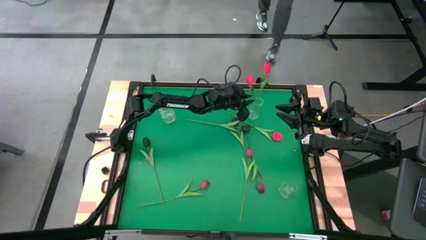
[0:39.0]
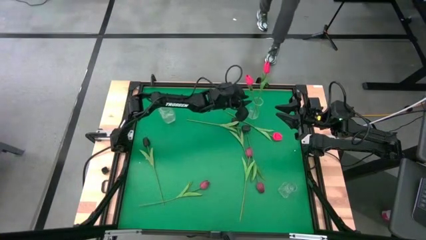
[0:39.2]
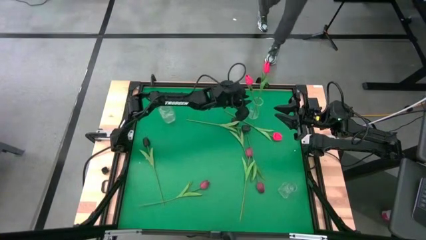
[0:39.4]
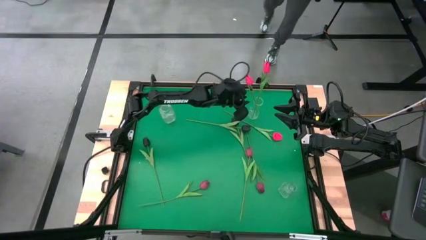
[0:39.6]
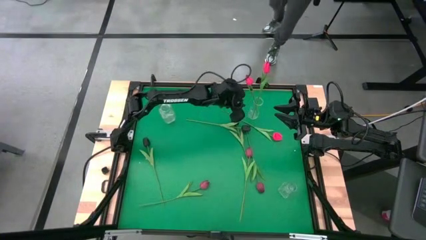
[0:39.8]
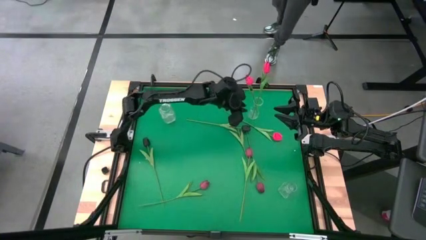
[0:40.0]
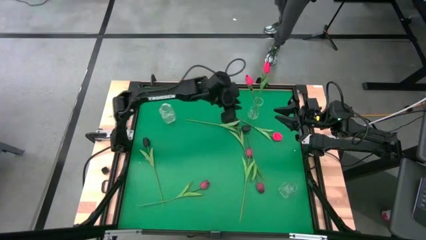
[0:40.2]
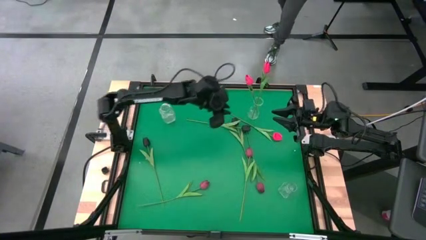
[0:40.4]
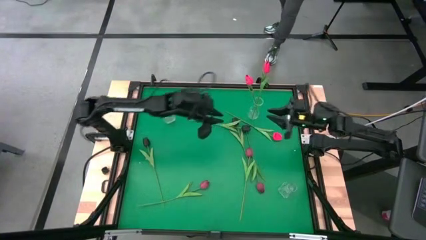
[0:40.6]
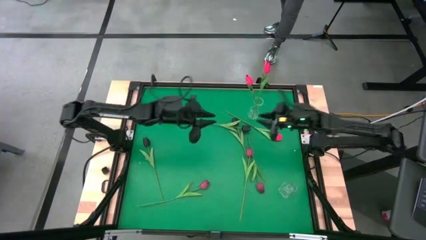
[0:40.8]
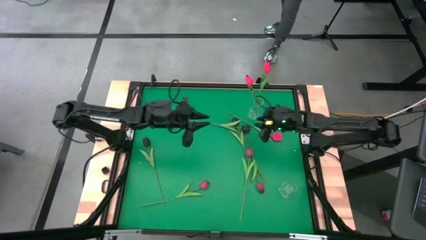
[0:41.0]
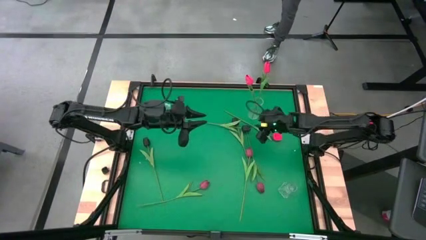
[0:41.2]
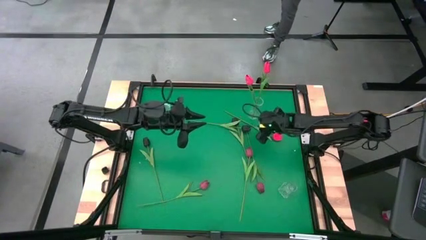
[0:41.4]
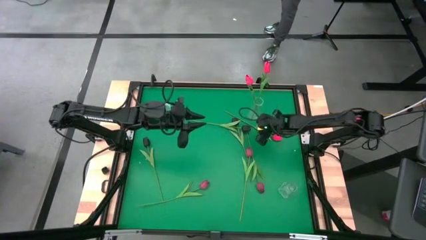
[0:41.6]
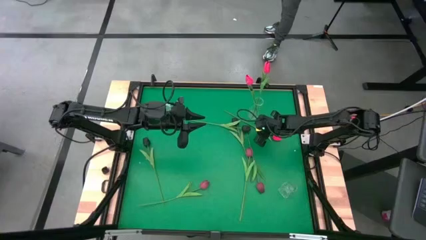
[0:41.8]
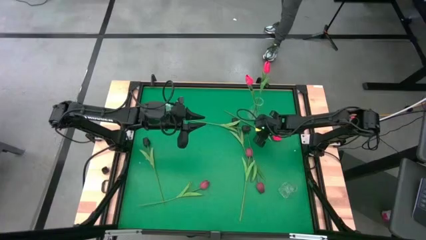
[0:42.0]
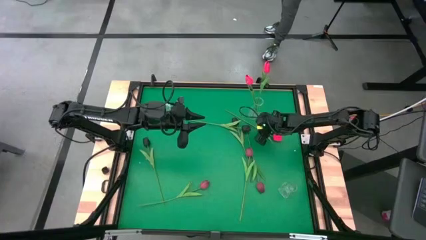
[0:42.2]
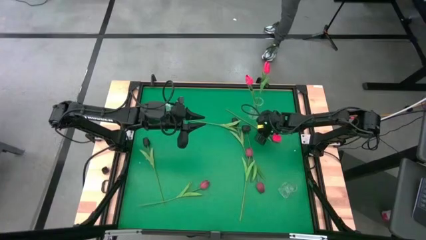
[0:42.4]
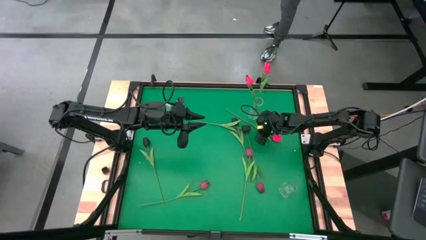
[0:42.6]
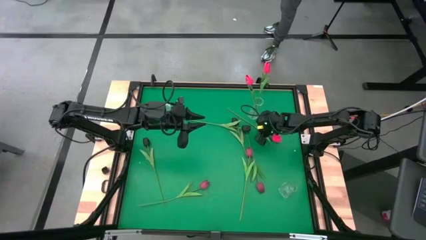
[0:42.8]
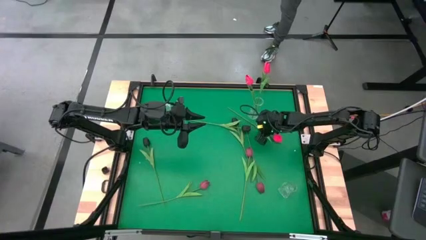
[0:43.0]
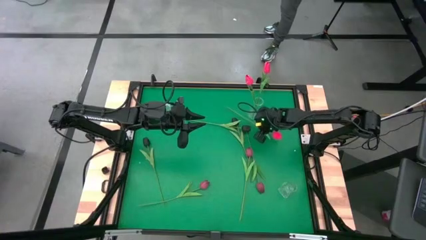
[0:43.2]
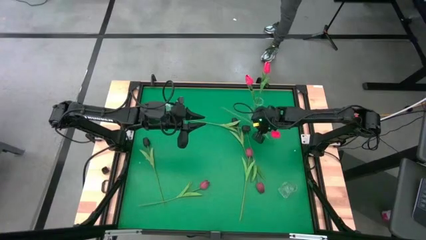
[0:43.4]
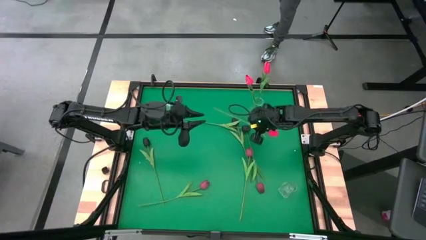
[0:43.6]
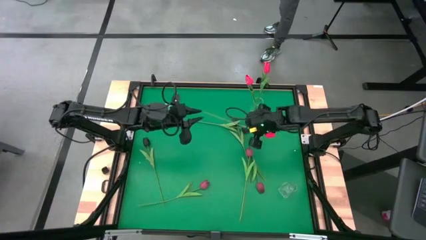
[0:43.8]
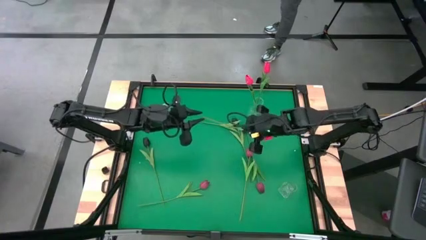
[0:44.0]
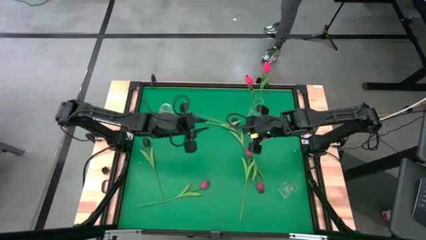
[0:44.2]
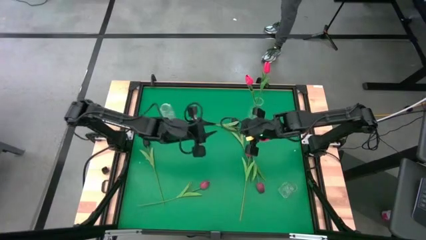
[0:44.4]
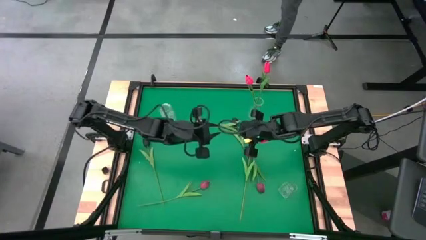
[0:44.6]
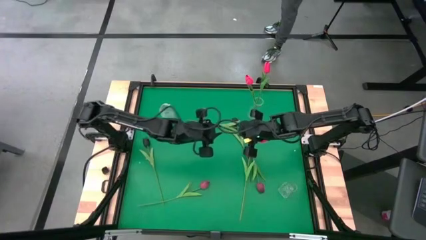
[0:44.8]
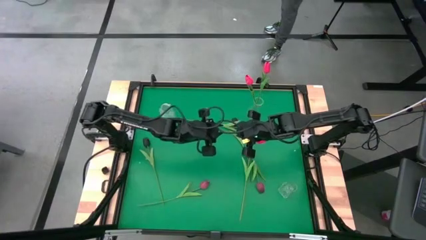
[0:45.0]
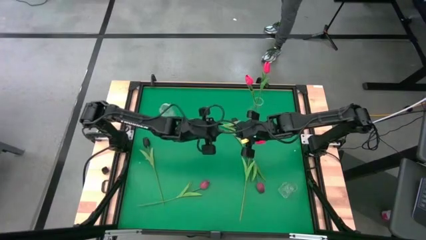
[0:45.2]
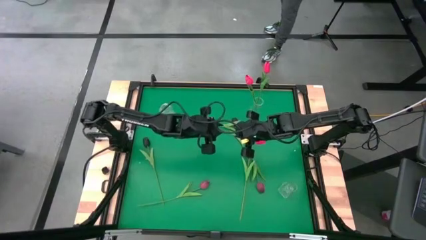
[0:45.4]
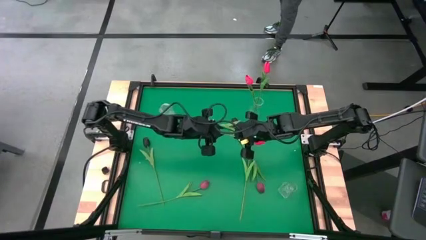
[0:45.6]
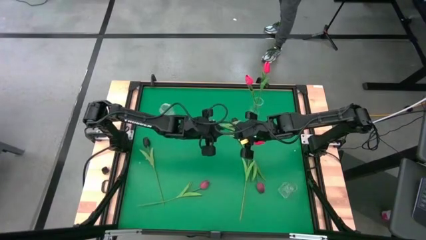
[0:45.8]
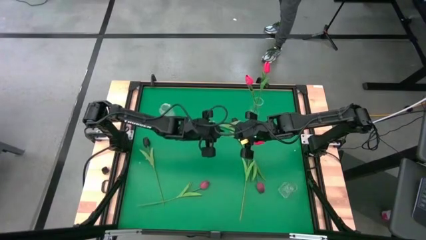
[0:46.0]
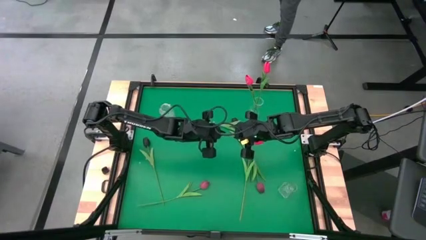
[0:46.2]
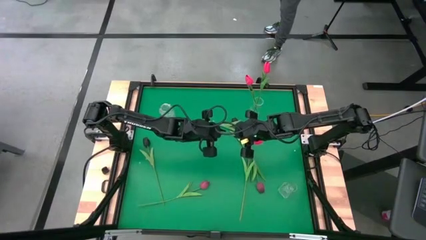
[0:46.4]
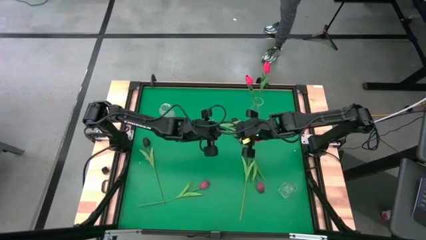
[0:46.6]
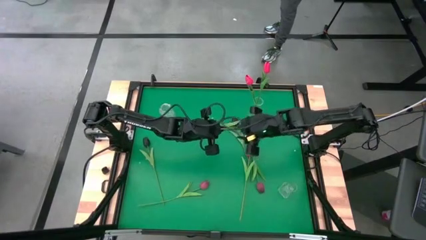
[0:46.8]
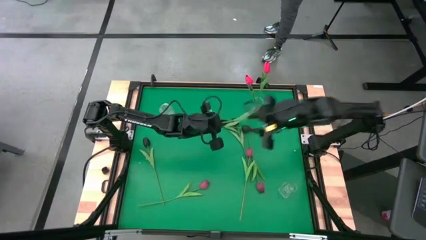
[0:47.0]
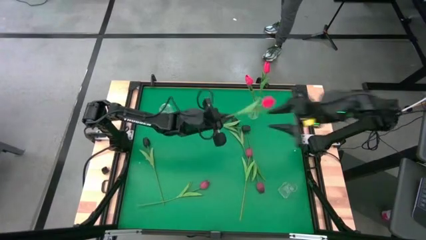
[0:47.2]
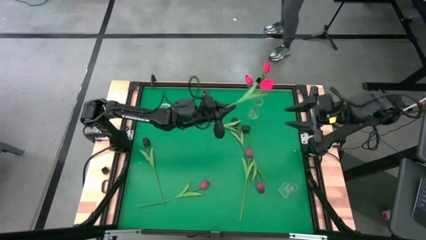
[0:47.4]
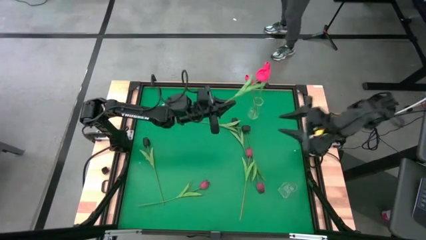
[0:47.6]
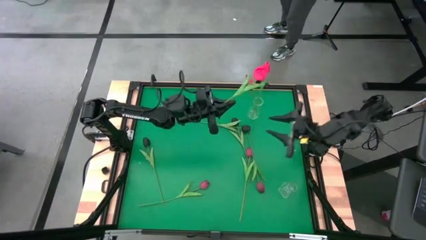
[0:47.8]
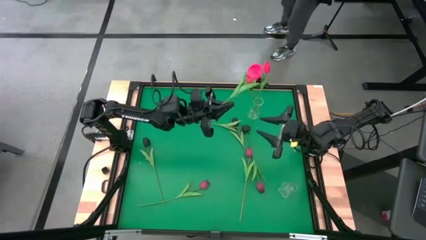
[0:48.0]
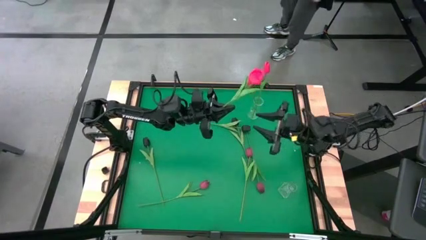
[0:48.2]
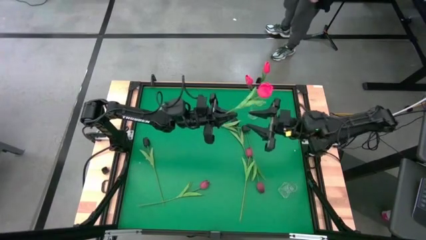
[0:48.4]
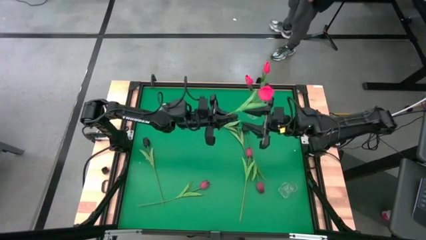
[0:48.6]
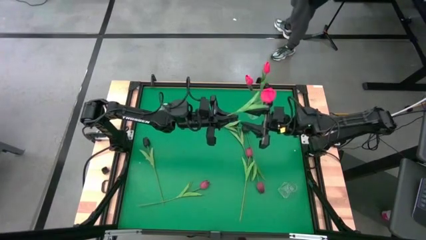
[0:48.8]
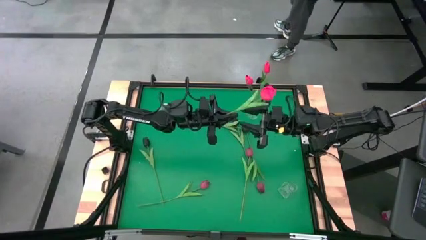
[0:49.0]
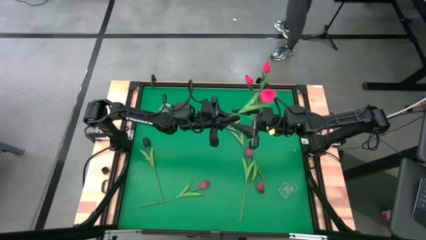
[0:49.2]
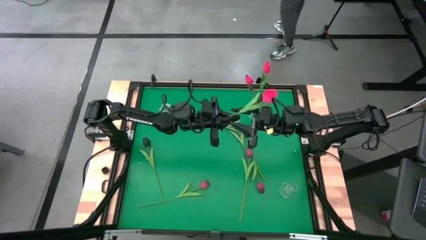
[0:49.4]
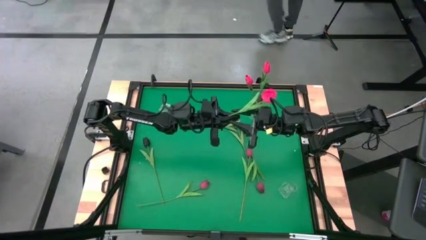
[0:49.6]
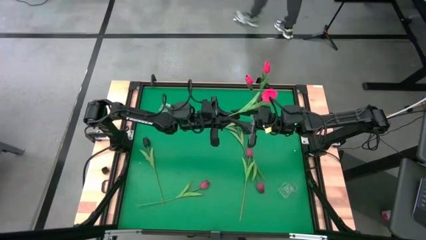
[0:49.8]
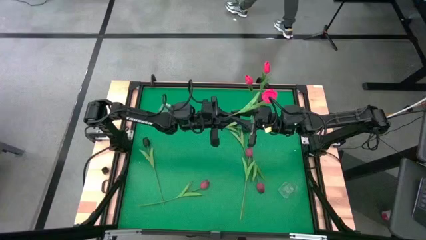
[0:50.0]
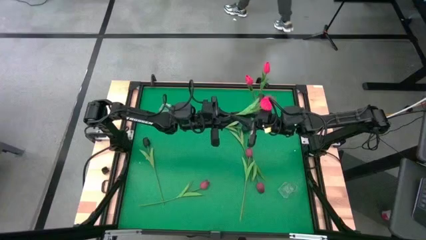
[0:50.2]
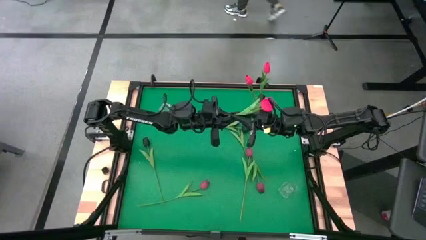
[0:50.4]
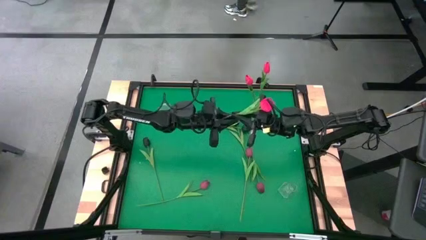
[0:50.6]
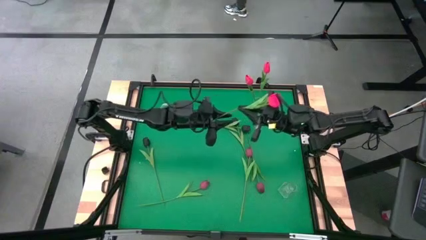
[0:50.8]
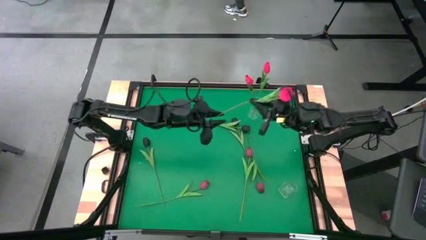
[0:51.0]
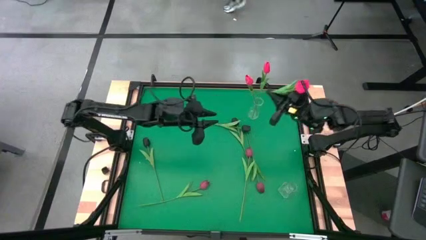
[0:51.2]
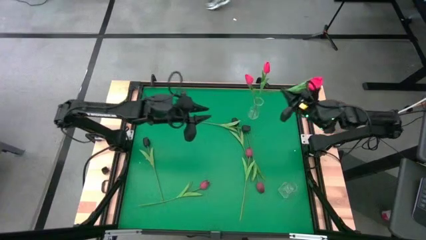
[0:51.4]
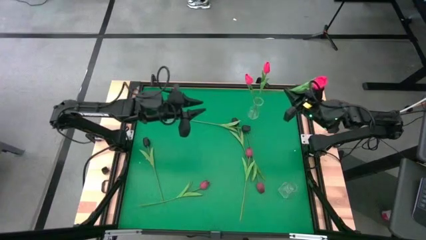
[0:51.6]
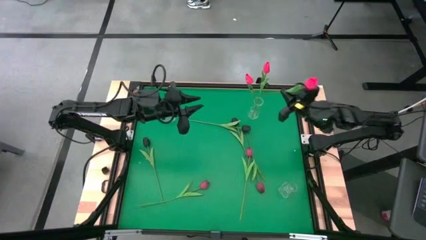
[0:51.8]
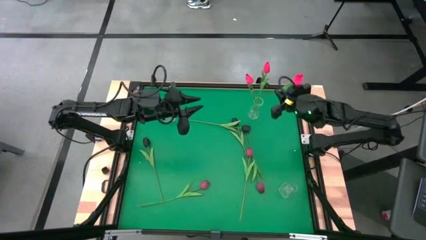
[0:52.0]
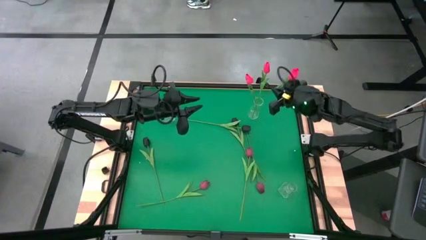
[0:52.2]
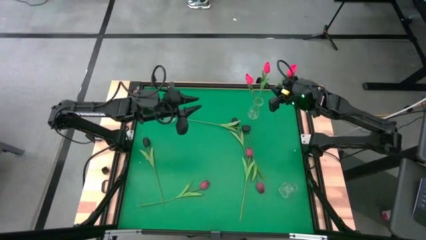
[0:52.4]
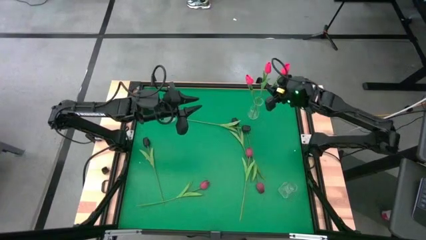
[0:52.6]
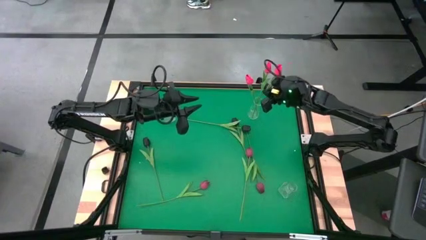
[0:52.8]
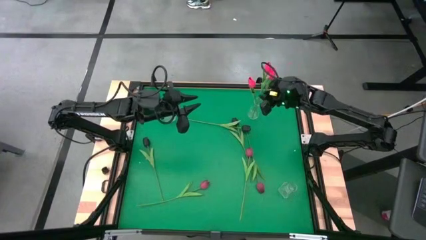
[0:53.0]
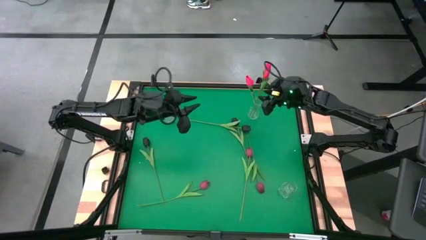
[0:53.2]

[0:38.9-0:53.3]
Task: Sort flowers into vase by color
Put the pink flower into the top right transparent vase
